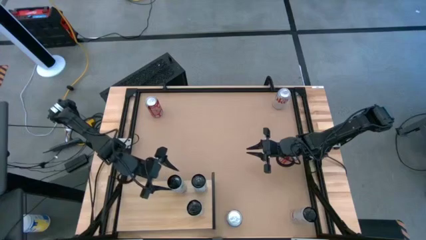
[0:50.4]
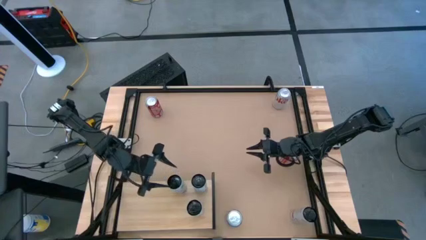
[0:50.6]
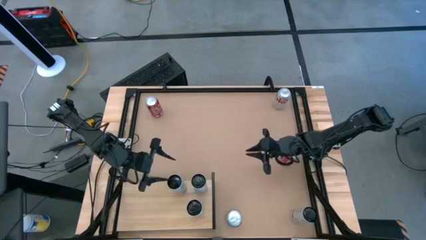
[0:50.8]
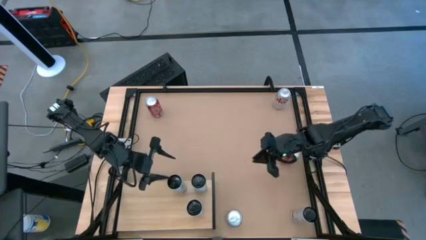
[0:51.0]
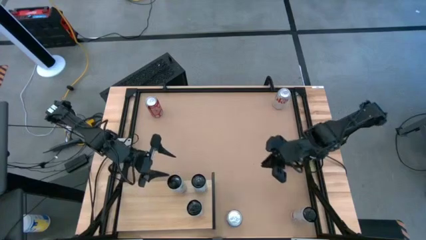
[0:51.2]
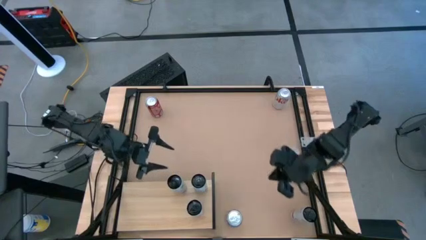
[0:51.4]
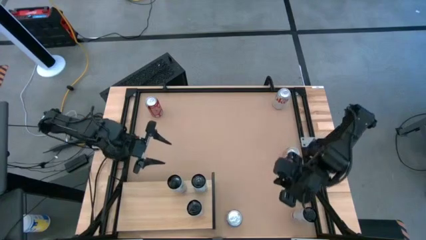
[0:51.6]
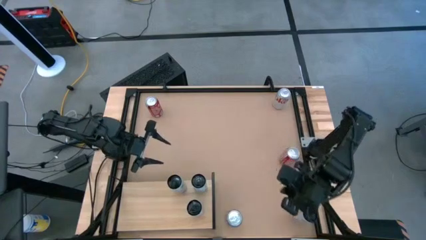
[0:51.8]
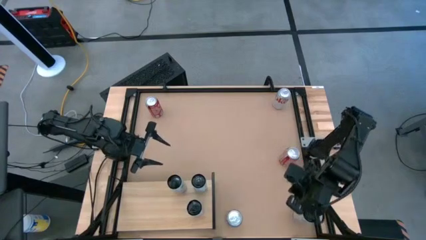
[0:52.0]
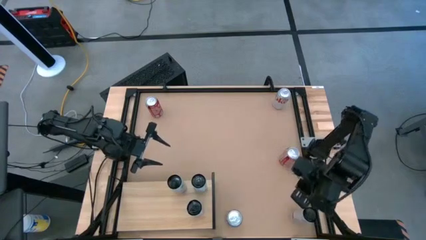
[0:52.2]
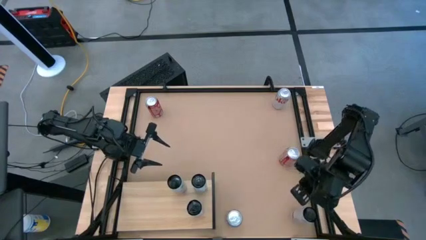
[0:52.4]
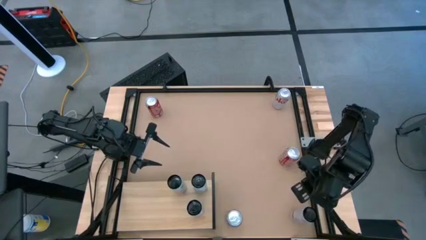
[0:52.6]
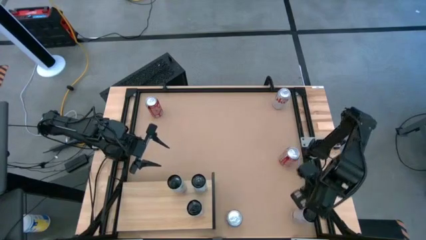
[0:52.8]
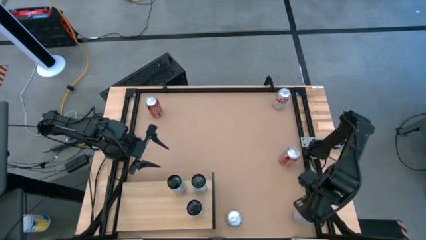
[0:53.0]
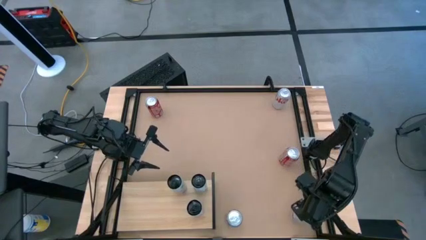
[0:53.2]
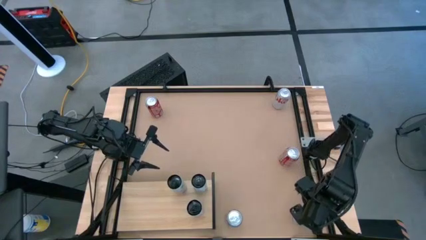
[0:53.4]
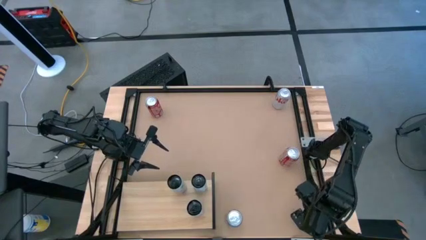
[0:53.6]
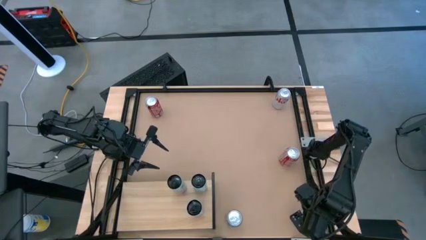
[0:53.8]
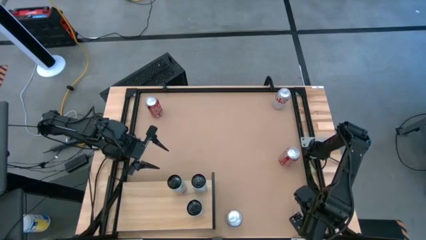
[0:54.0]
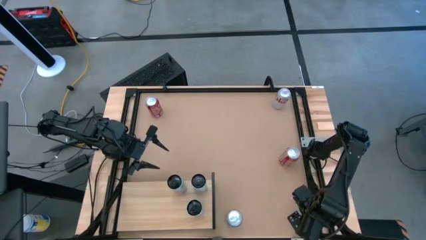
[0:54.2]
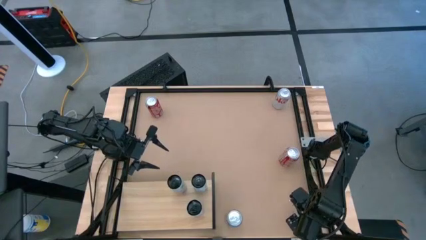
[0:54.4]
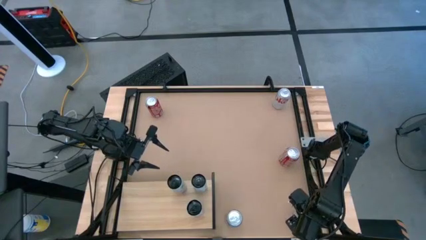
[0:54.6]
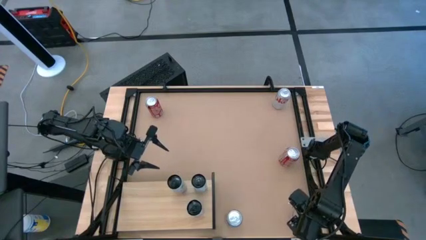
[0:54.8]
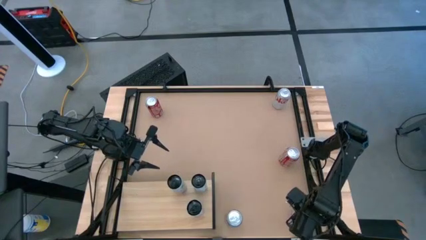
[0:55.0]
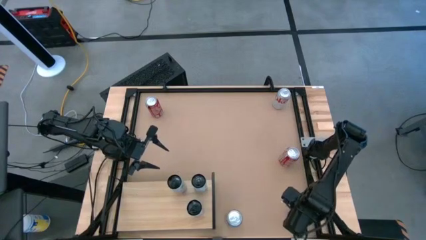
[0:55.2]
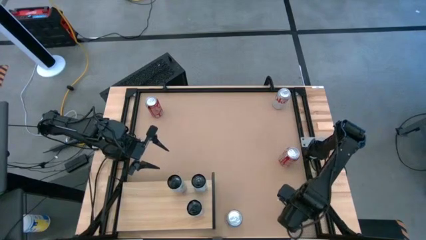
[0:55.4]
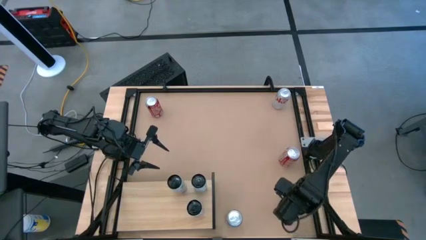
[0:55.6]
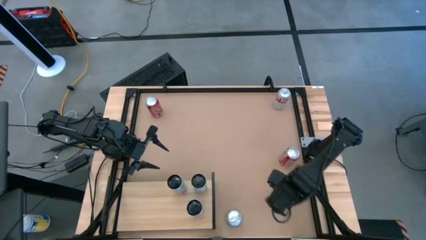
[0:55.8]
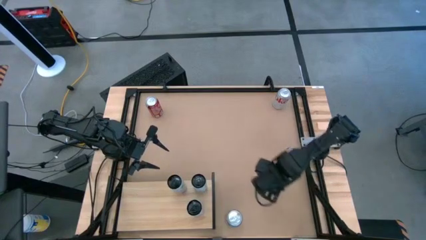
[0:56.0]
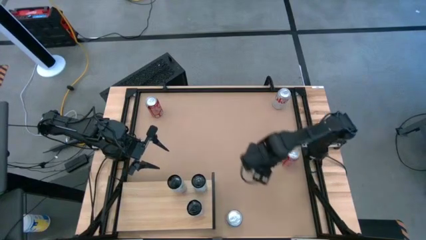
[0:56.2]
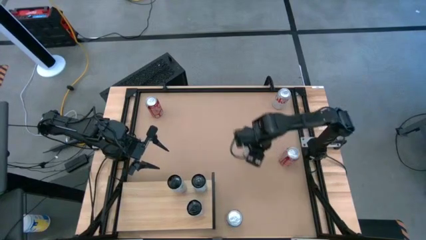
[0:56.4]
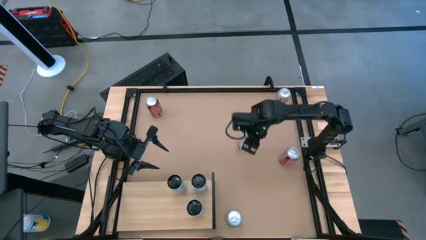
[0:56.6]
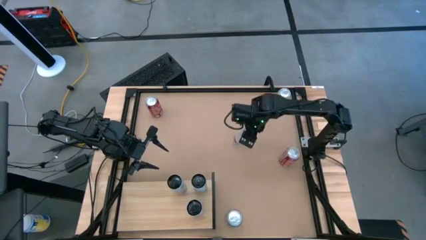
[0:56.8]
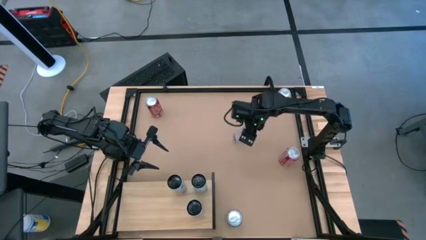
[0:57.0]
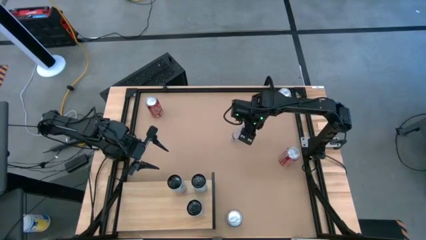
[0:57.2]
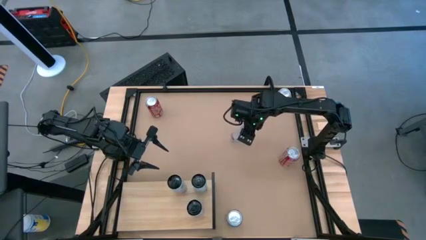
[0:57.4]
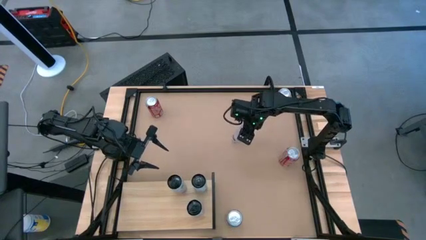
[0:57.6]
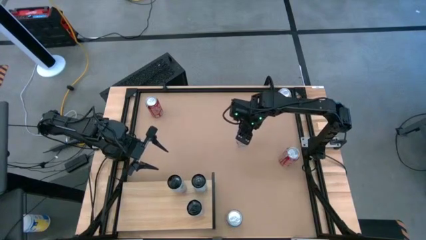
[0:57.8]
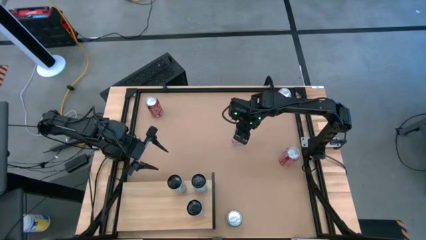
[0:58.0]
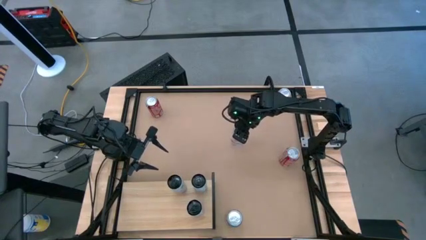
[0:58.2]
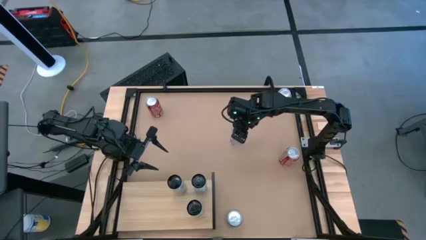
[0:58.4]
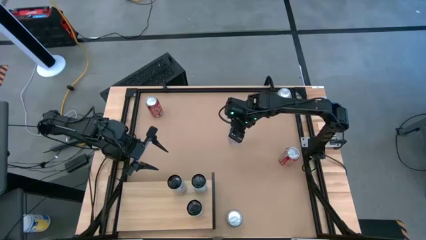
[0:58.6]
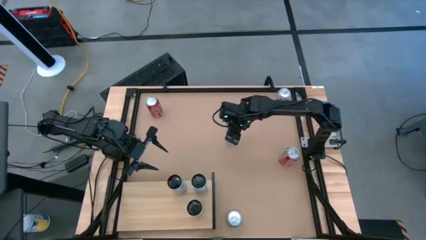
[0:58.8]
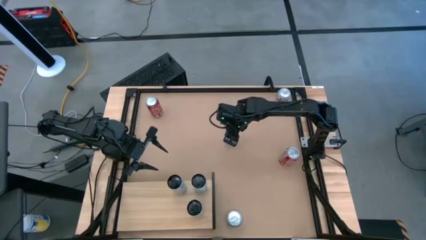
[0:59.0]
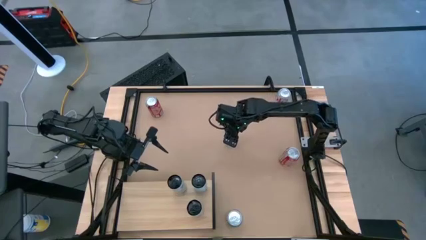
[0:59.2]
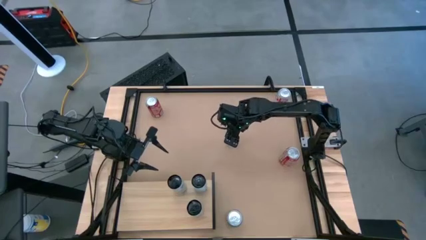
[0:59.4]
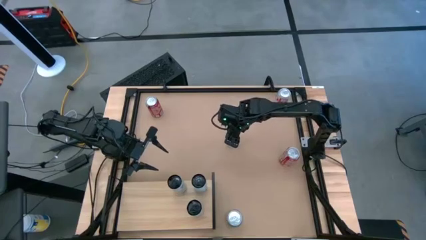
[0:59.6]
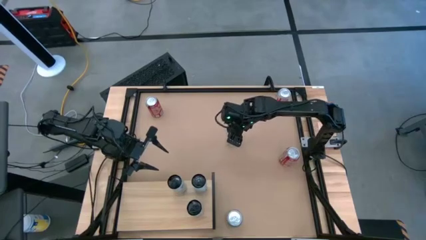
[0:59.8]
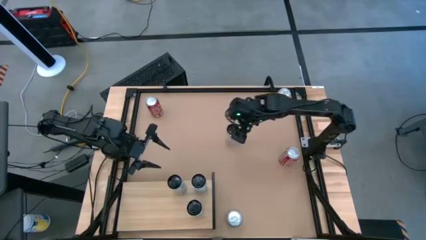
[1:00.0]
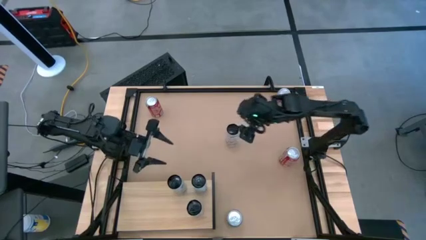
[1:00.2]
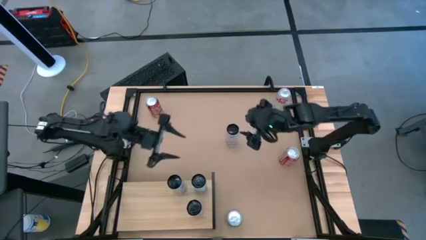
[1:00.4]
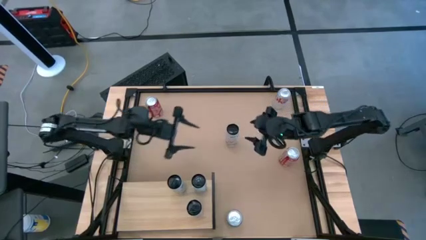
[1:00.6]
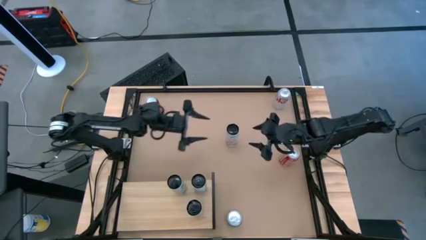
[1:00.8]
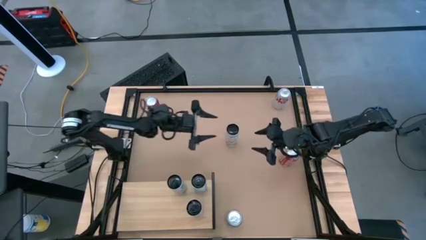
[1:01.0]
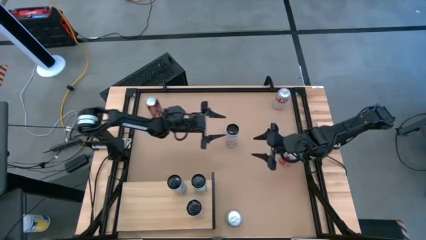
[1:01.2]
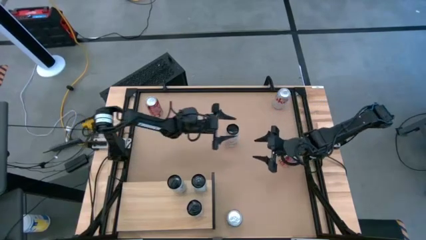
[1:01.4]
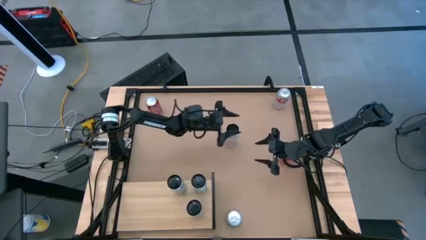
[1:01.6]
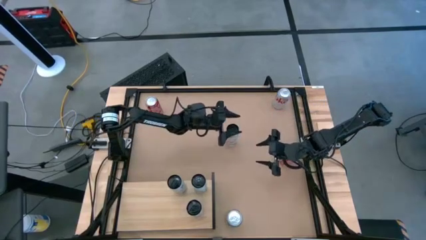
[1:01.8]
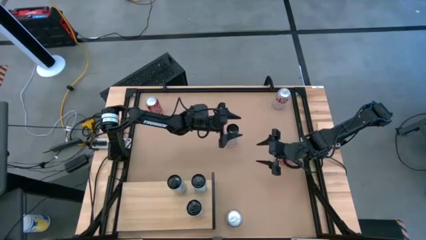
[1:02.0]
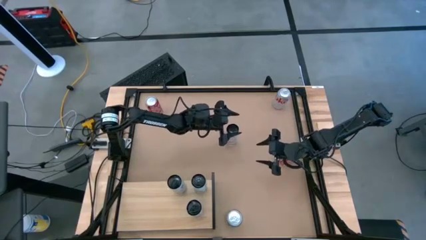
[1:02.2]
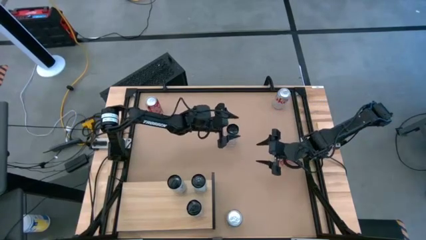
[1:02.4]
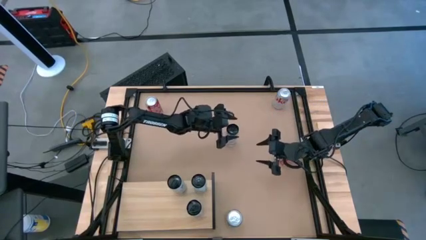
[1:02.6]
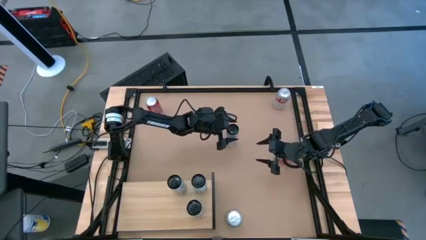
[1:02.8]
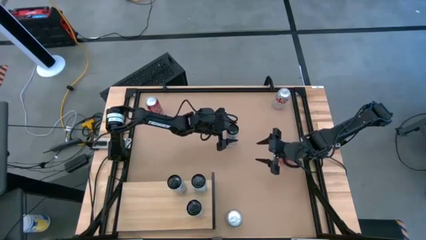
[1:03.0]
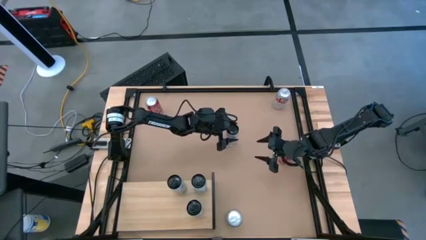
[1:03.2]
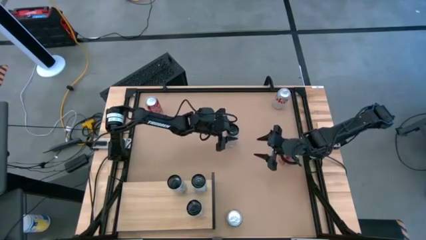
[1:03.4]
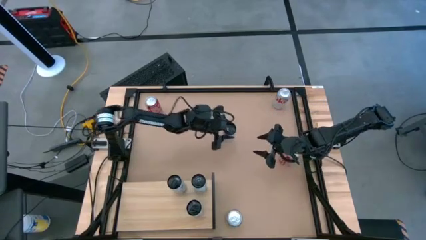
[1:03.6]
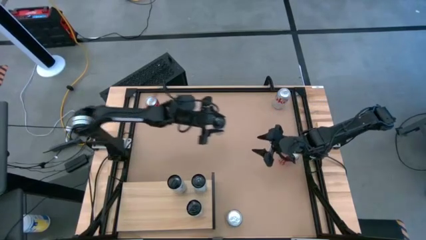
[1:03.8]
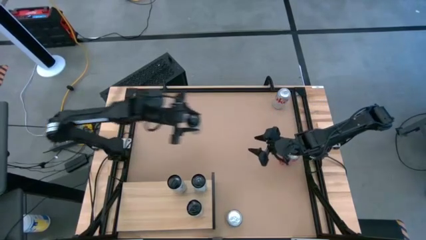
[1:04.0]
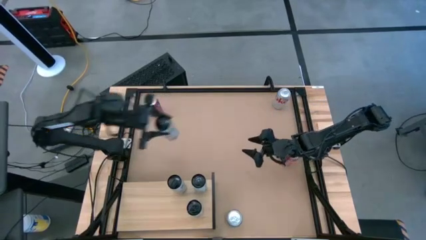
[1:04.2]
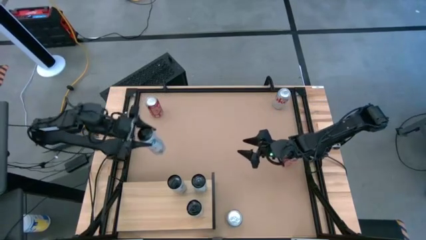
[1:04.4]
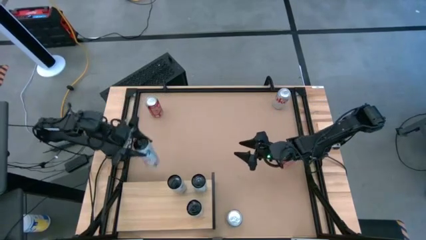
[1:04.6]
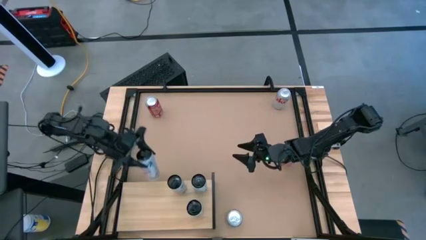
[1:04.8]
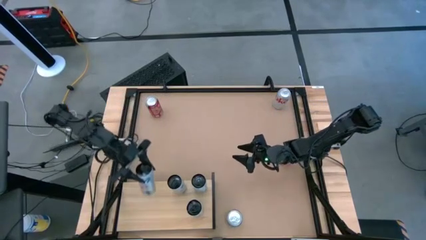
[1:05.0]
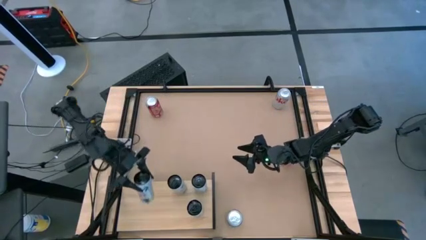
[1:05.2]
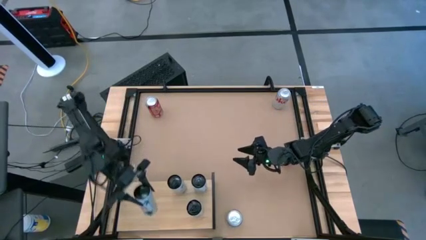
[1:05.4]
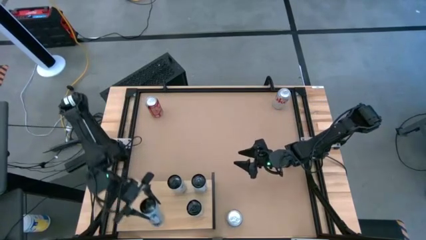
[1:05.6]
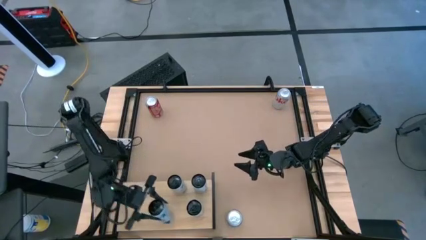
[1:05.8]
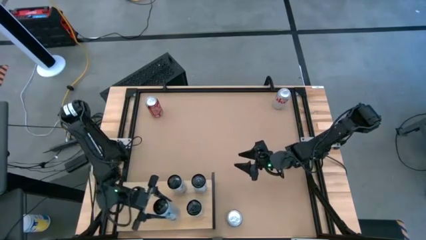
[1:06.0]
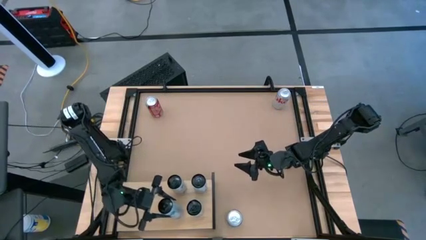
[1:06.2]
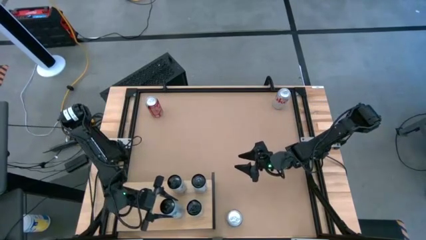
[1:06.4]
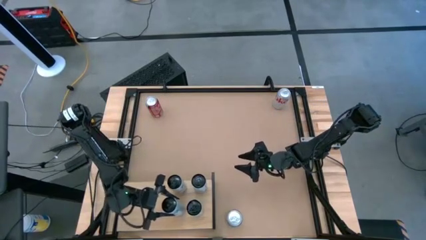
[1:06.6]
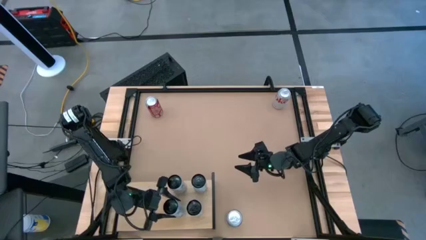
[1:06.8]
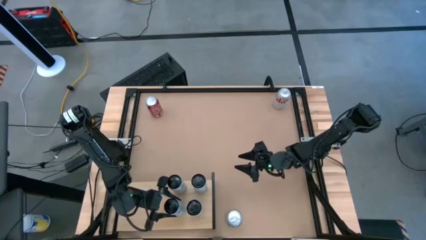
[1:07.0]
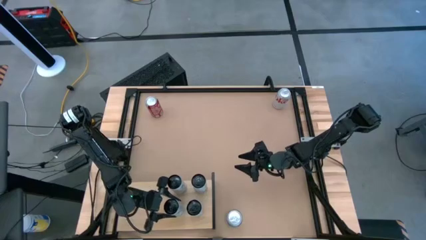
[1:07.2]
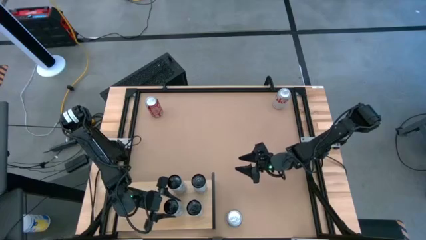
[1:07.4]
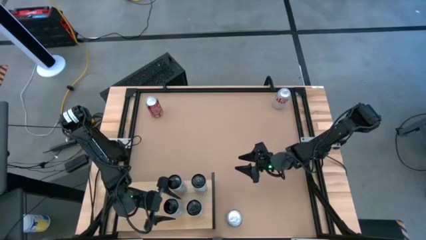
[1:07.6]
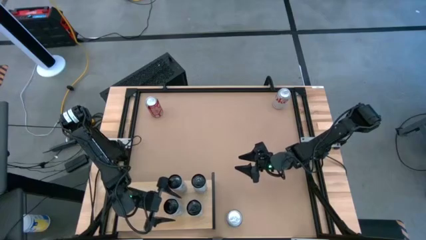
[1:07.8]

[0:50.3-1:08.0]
Task: Place canned beverage on shelf
Put the white and pink soda can on the shelf aligned with the other white and pink soda can
